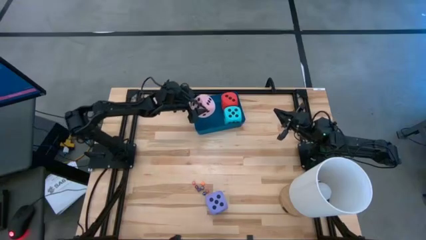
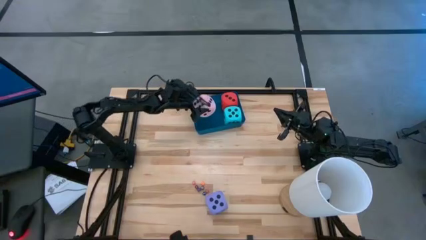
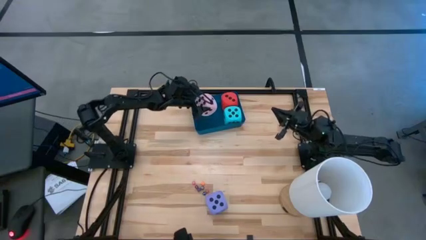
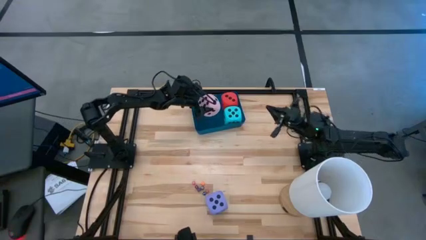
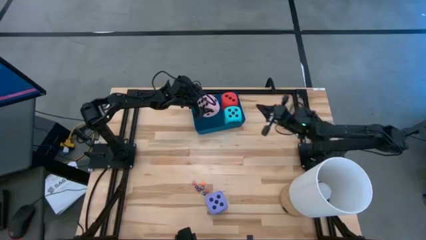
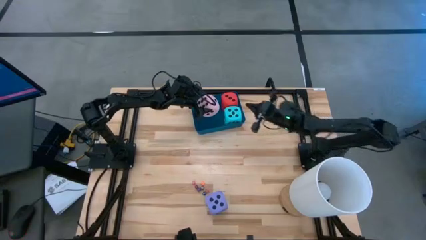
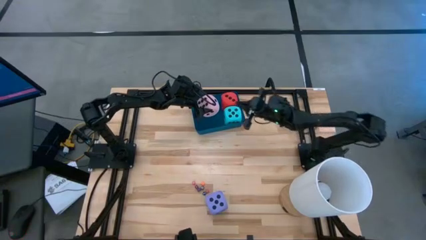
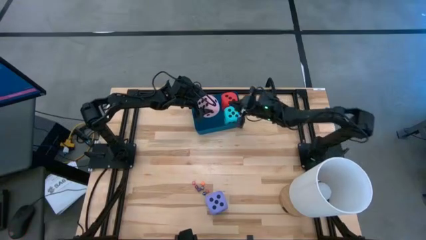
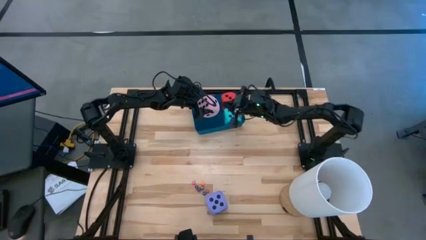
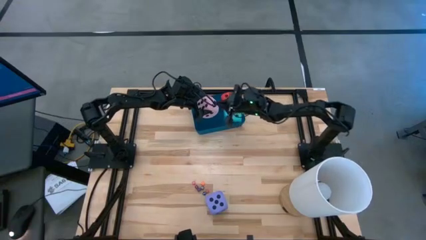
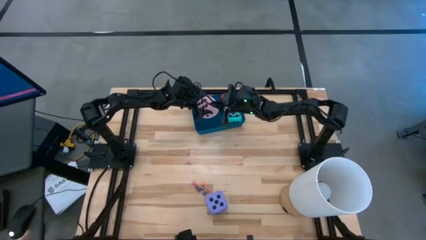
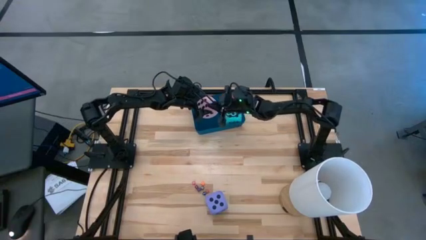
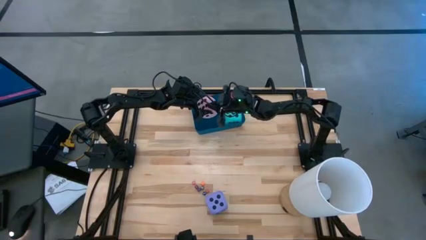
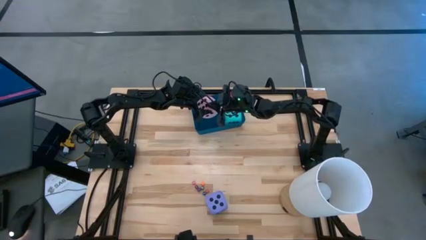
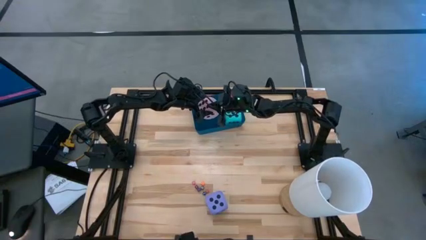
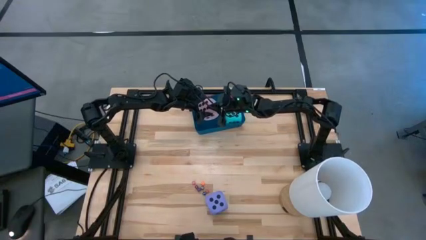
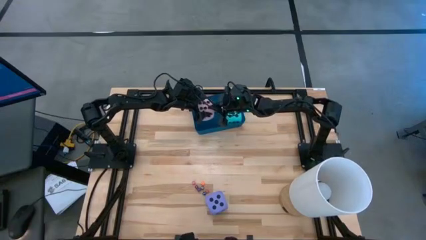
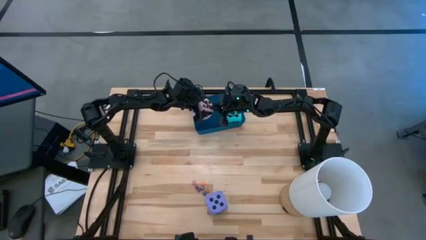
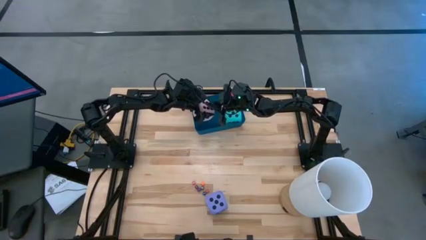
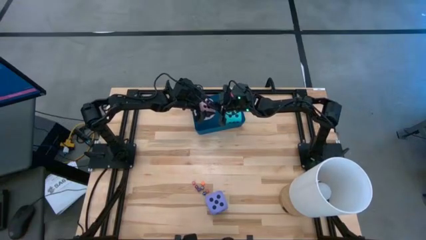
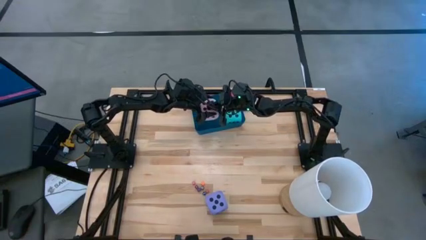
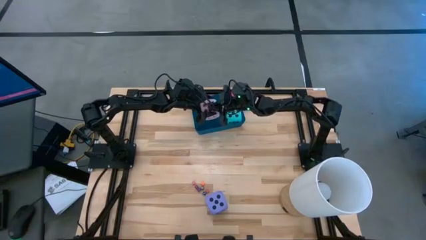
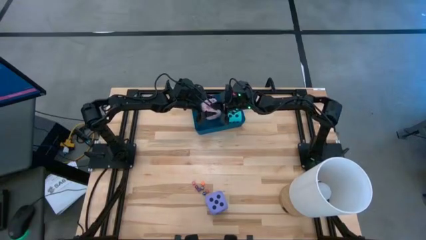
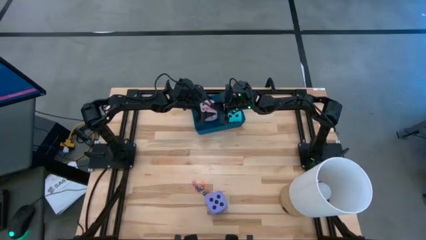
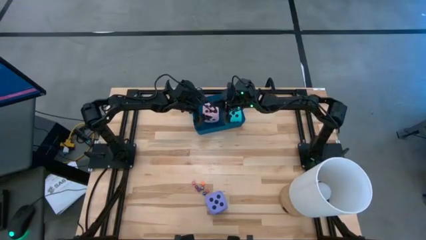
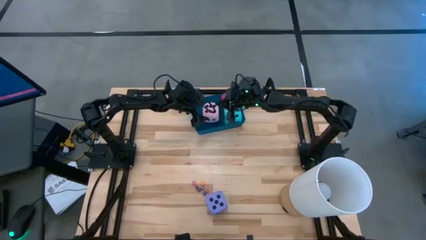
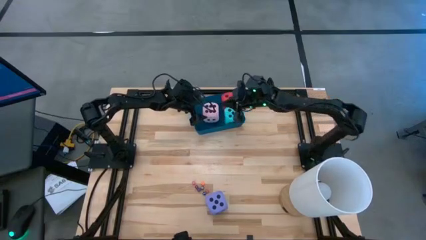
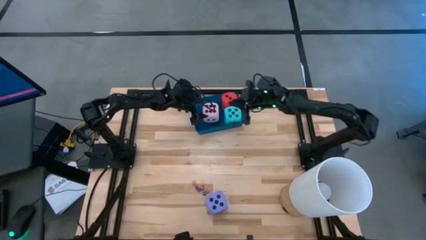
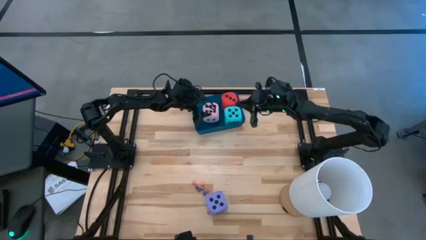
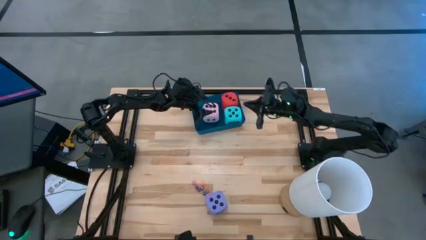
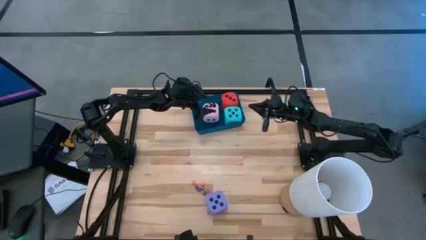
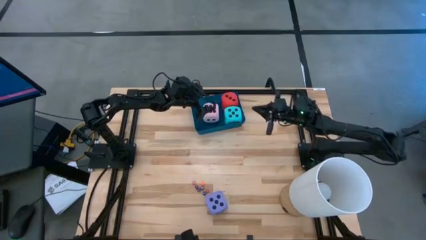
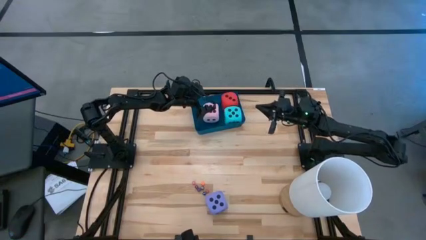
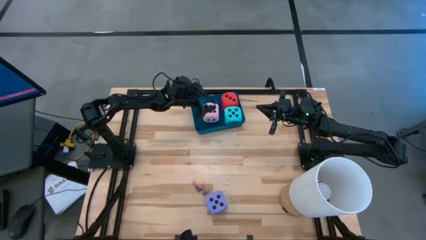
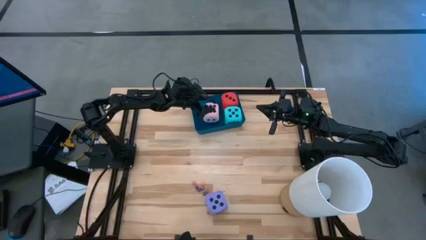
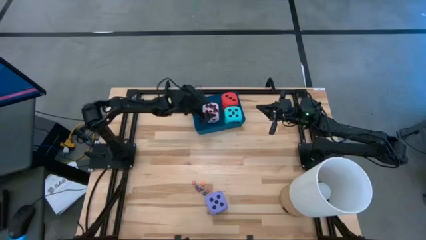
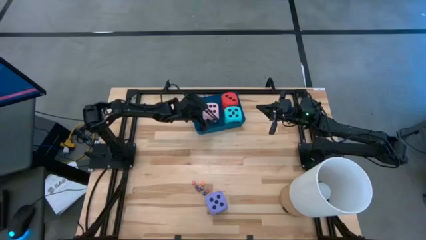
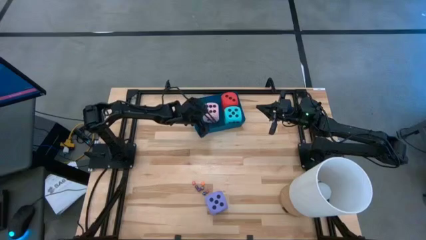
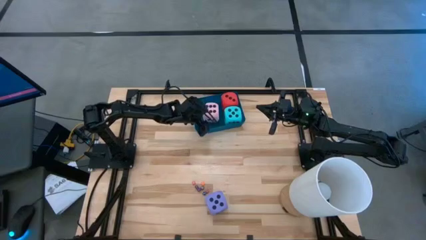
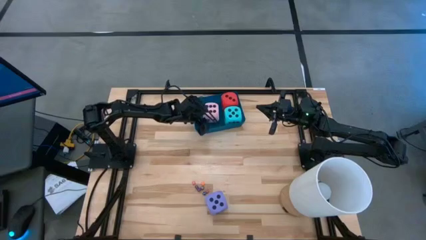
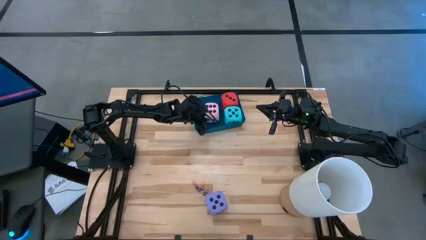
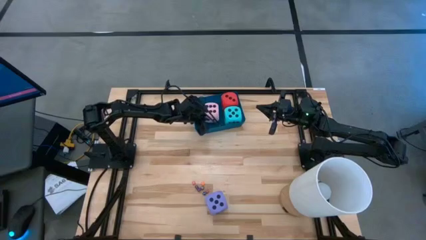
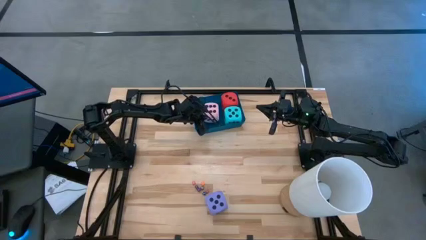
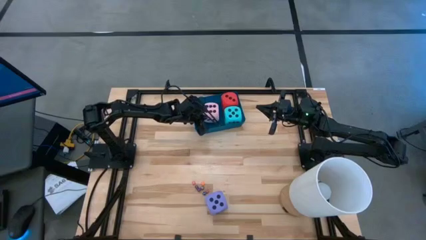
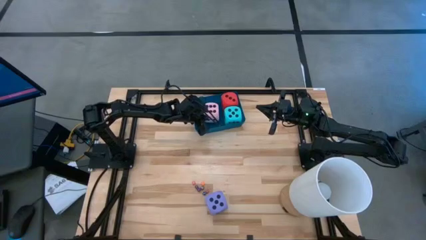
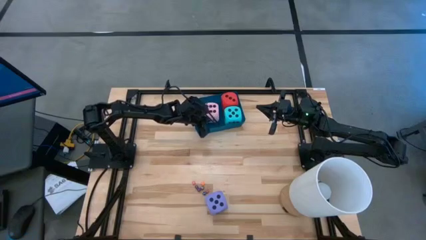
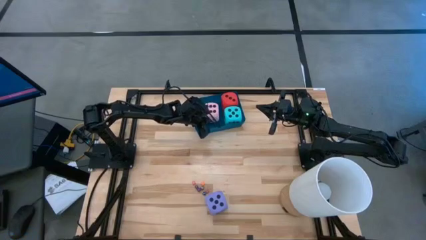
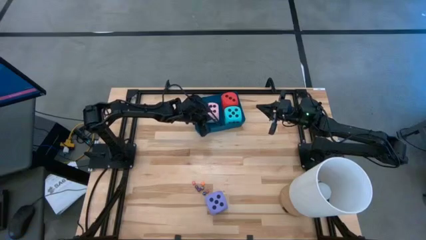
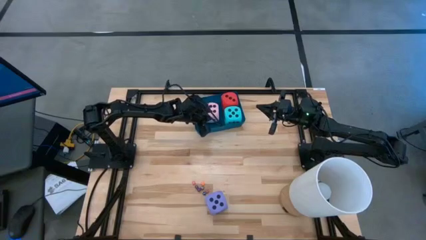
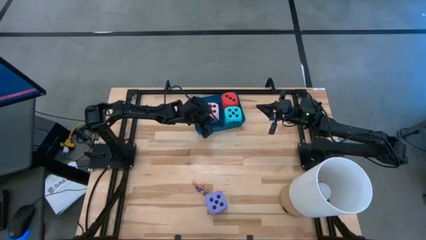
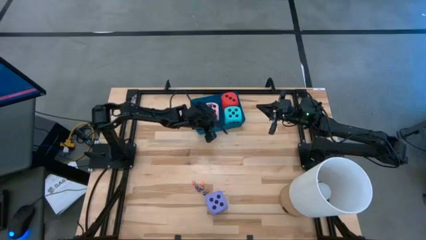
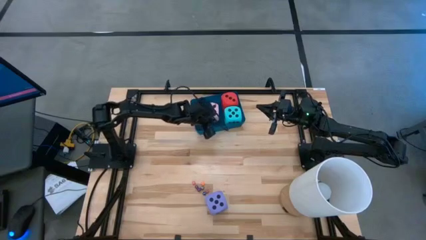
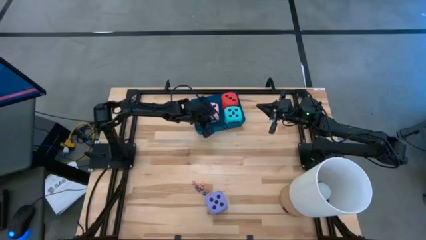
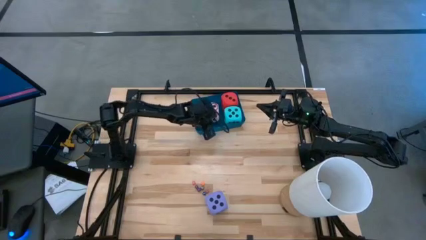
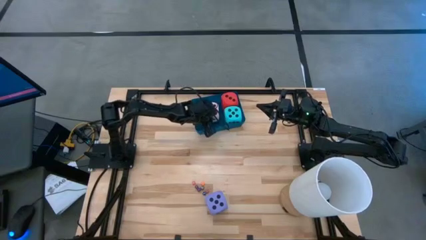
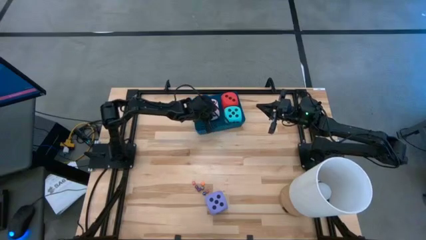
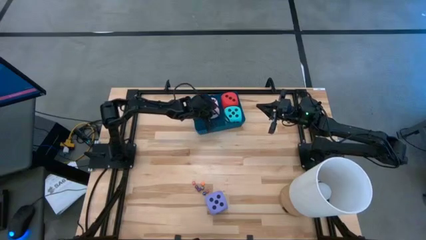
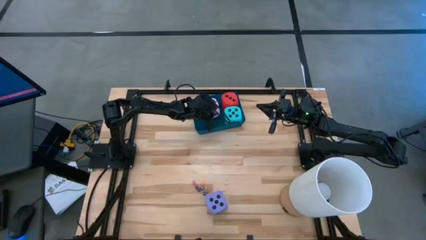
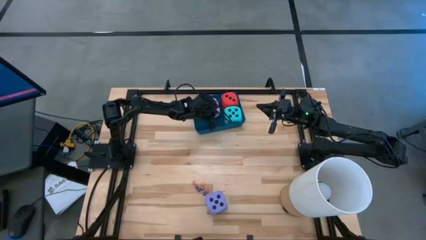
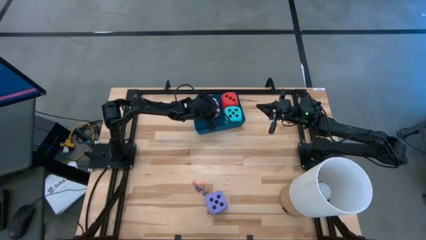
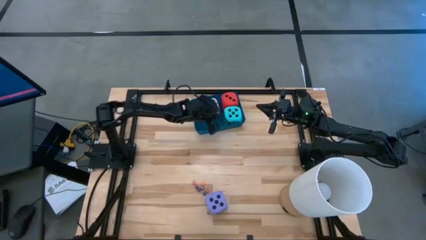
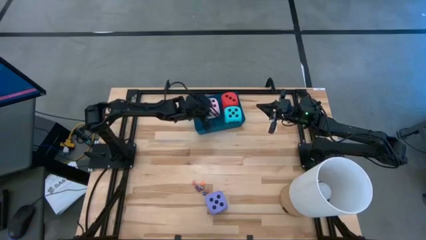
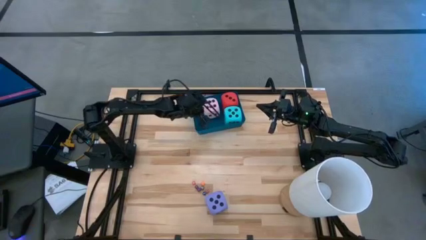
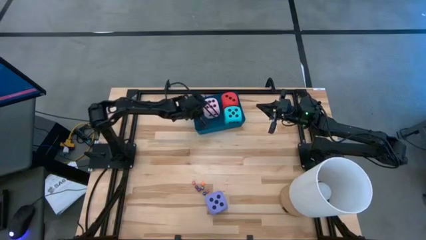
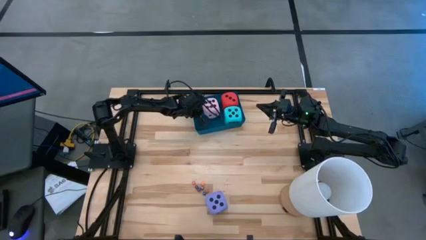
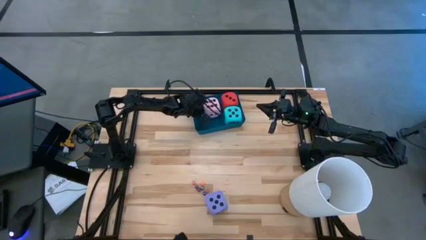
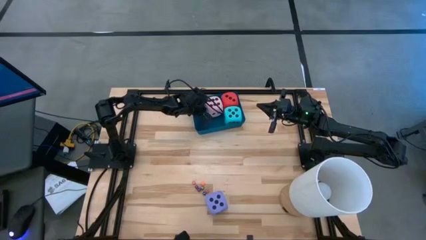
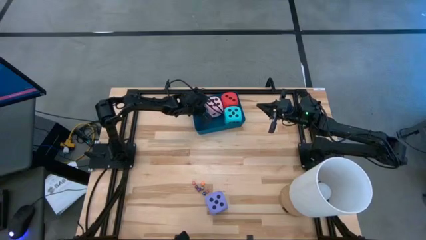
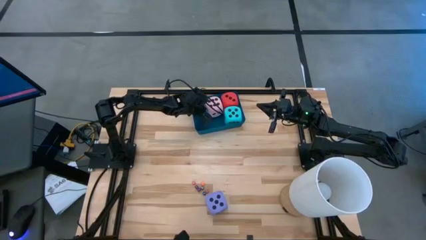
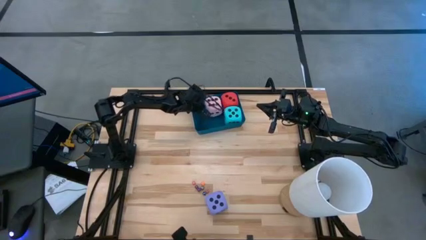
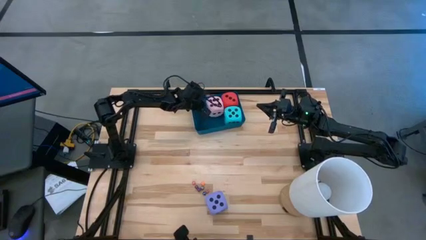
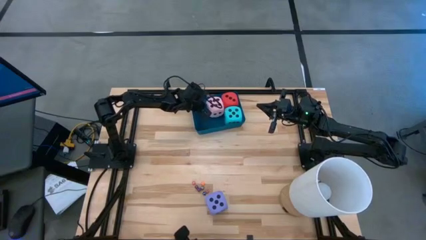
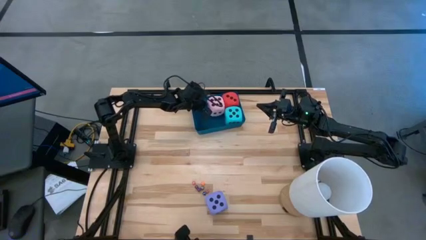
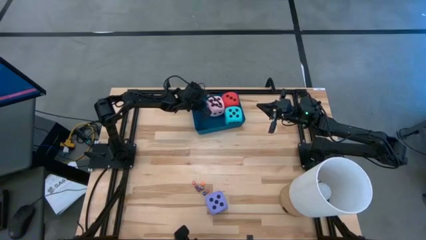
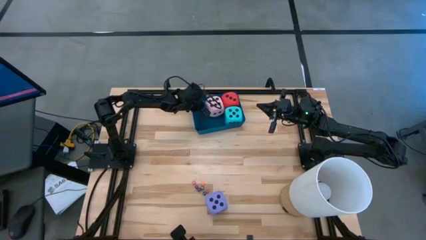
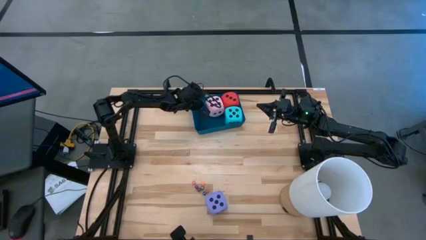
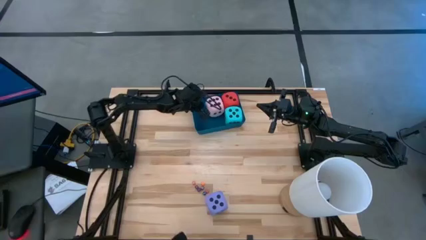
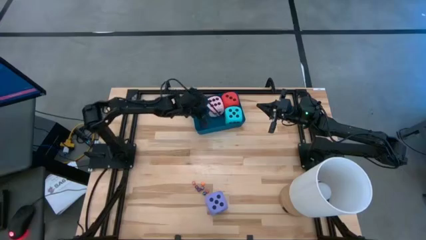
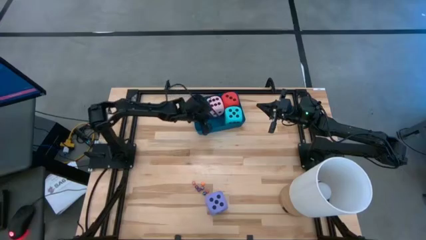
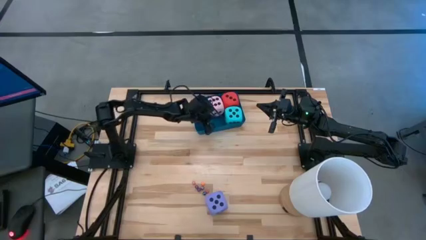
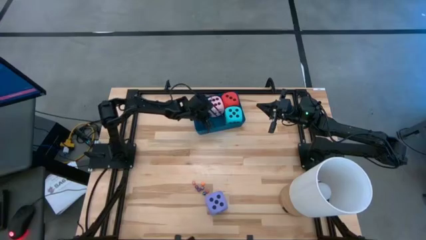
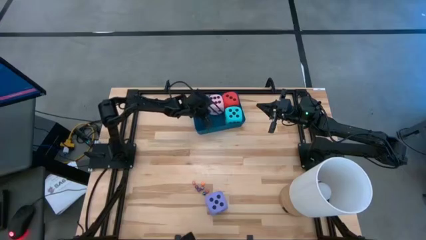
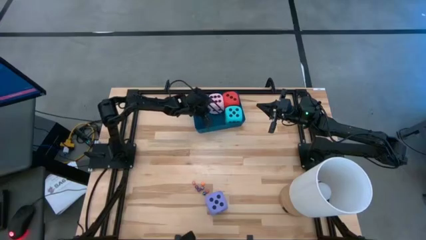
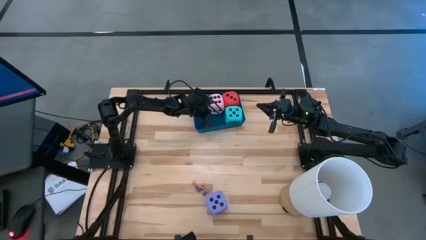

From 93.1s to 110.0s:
Task: Pick & Place Dice
Put the large pink dice into the blue bin
